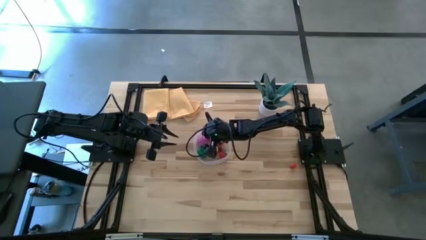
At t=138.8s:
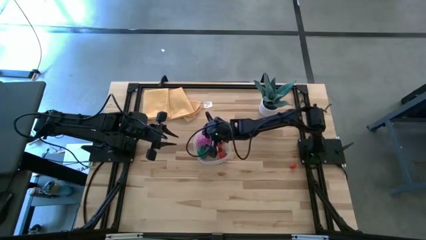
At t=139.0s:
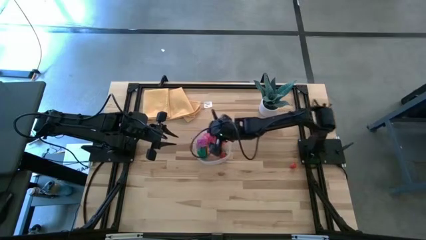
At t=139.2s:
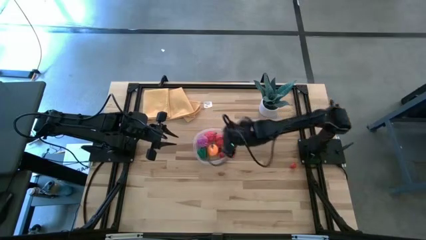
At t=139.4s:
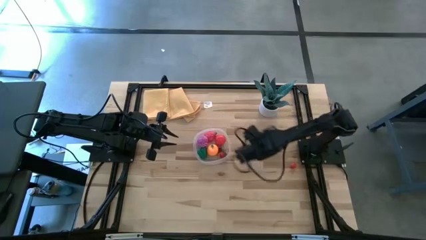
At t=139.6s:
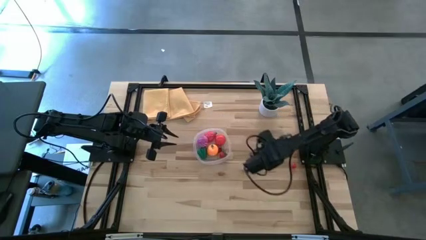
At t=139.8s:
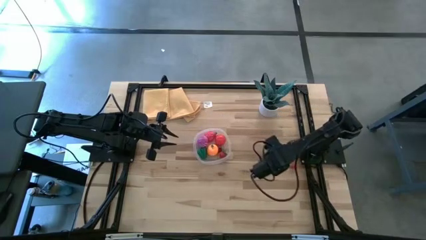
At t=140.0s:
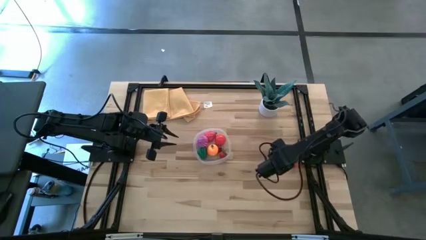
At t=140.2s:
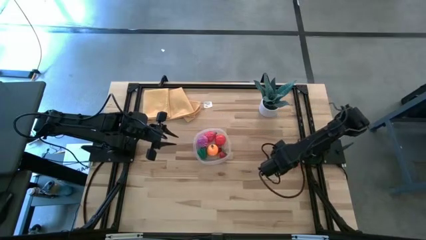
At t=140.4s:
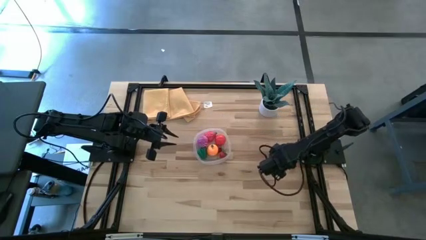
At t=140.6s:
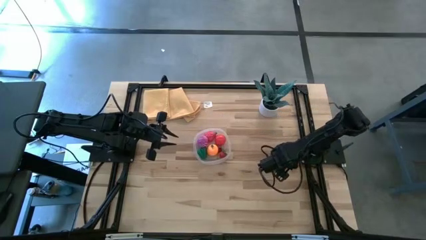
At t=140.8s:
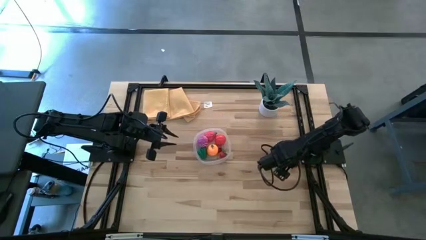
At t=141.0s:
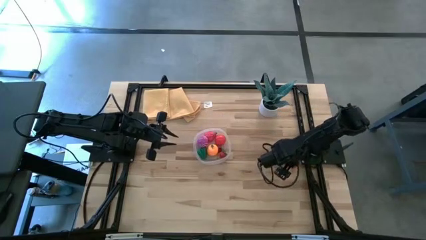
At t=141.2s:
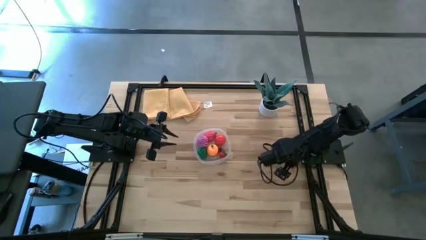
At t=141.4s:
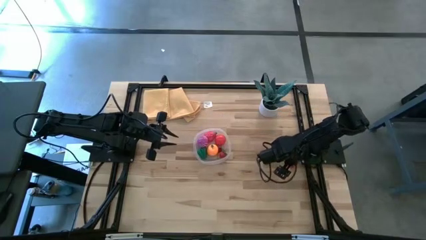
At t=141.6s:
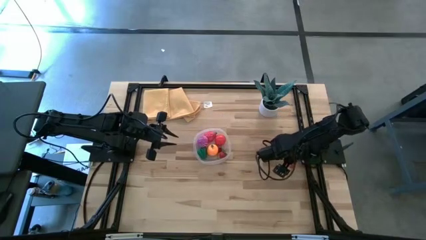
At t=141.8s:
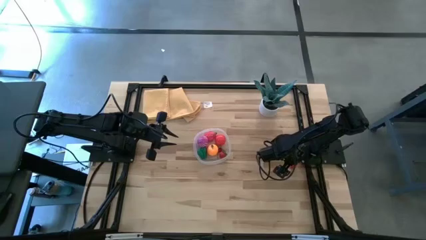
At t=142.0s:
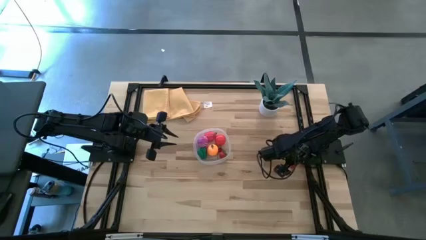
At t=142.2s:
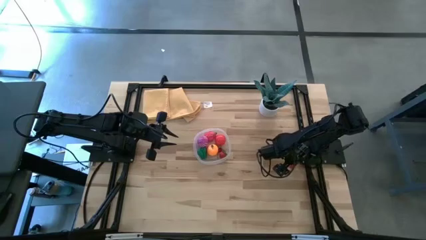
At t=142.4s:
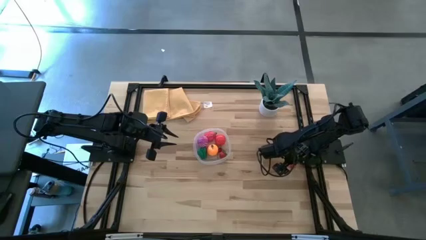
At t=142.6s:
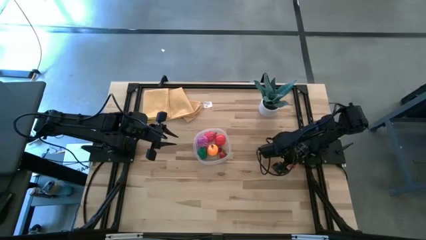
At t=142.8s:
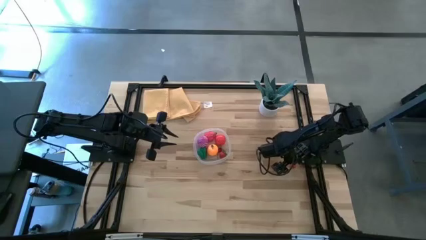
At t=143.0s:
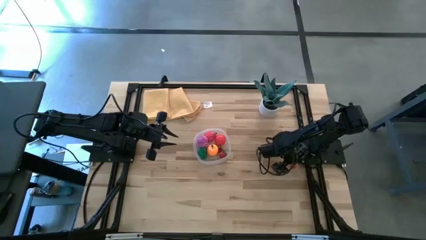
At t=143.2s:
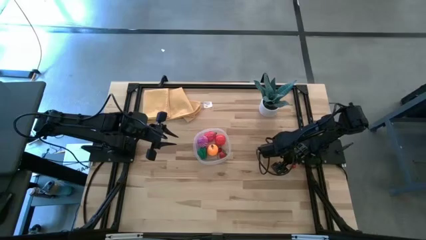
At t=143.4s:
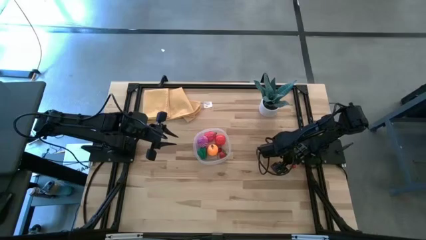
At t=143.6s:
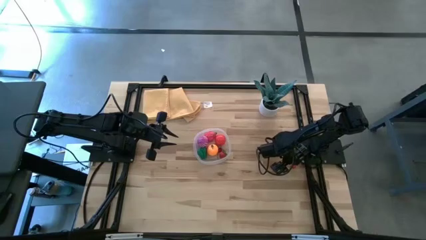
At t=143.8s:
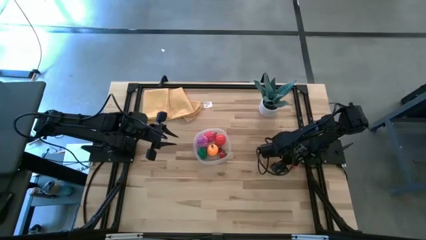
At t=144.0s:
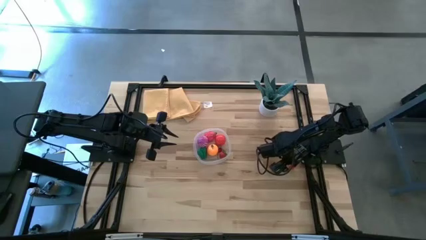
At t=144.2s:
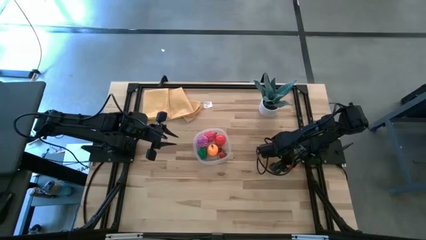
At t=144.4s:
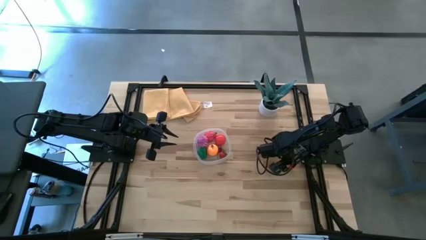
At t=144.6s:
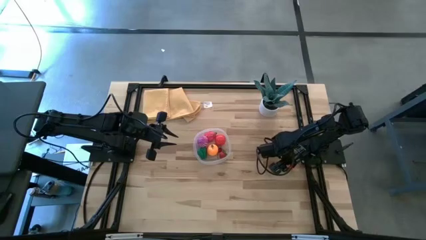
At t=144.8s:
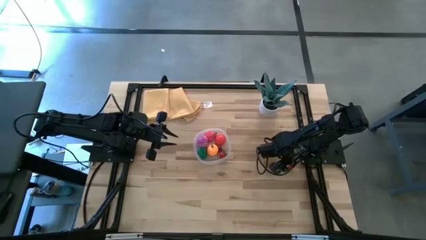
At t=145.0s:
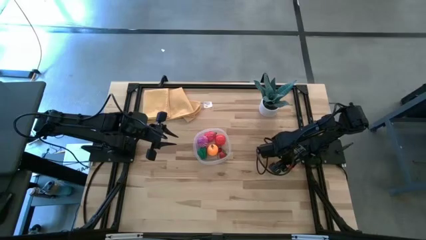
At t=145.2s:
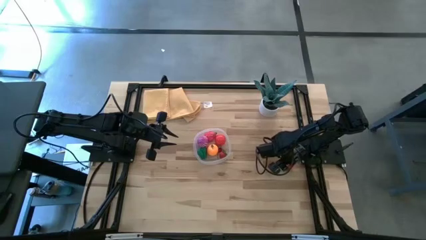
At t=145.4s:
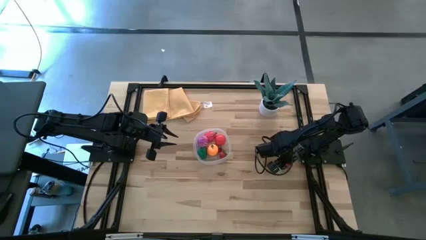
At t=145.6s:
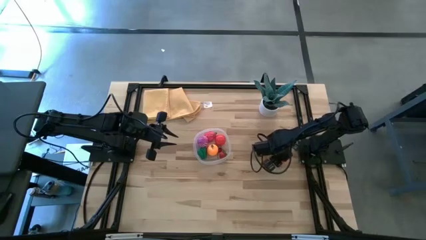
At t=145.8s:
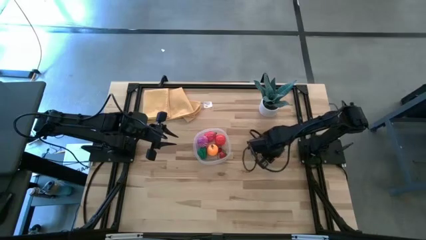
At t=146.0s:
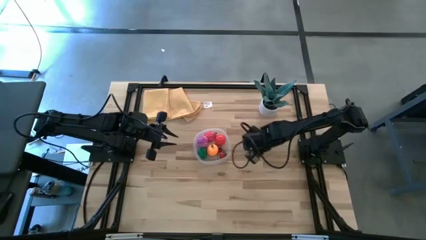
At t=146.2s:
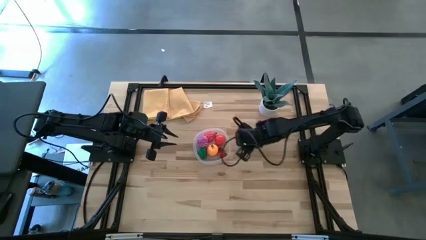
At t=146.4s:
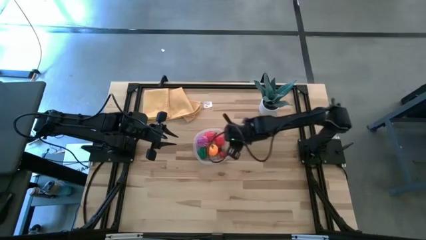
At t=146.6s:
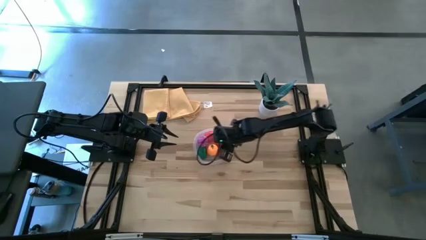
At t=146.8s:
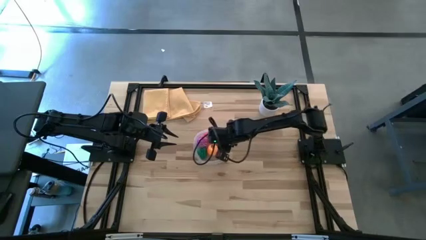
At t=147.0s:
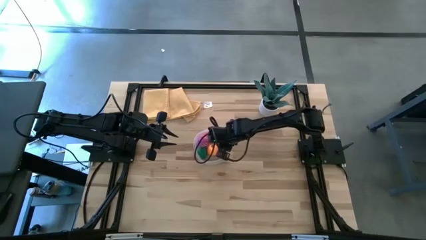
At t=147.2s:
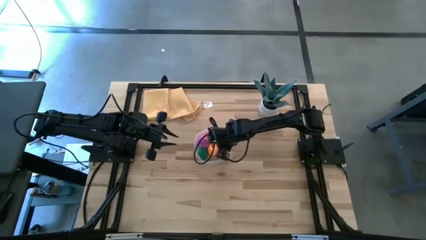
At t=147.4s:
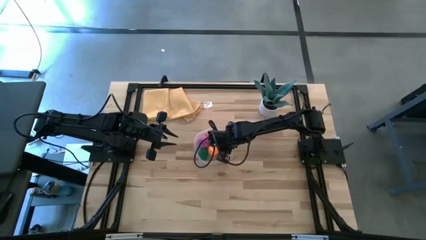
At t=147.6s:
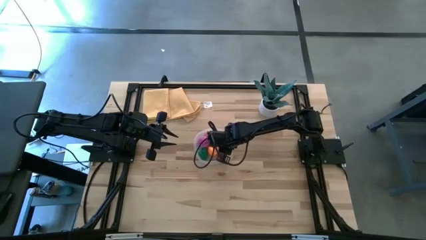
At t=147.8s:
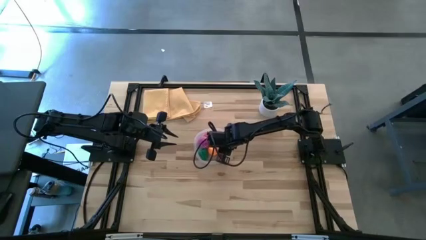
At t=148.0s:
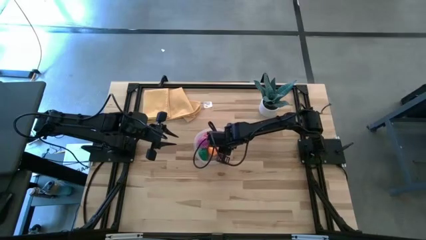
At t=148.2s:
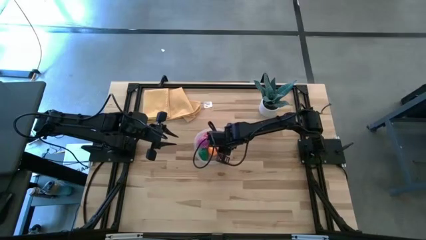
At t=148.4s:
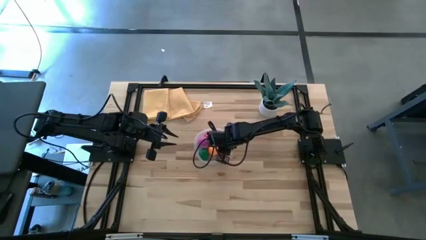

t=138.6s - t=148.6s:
Task: Pick and placing Produce into tupperware
Put the red cherry into the transparent bin

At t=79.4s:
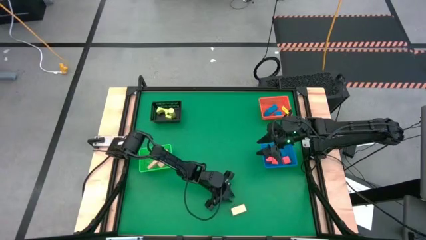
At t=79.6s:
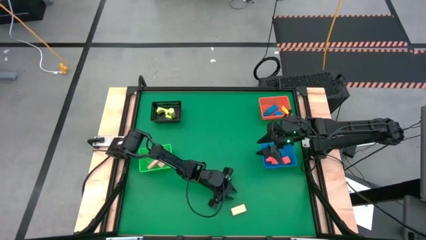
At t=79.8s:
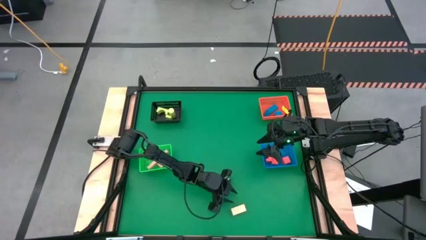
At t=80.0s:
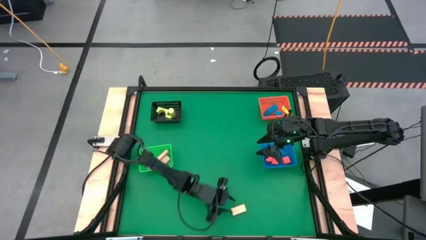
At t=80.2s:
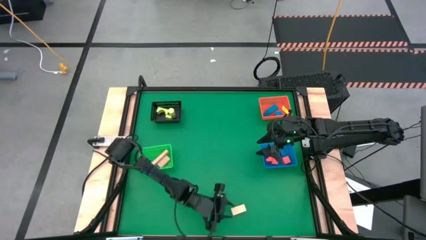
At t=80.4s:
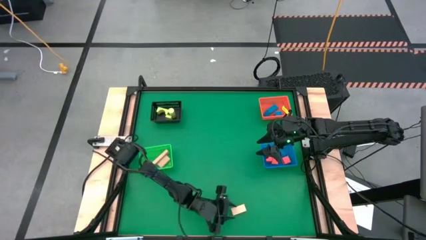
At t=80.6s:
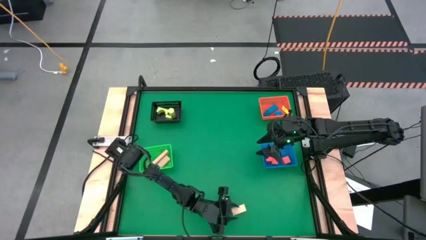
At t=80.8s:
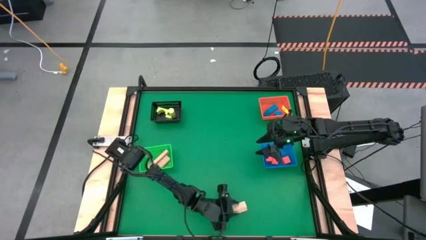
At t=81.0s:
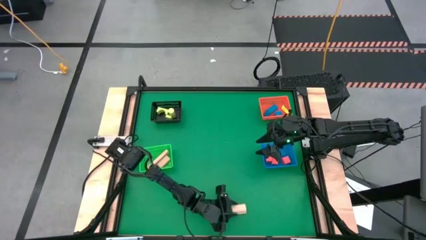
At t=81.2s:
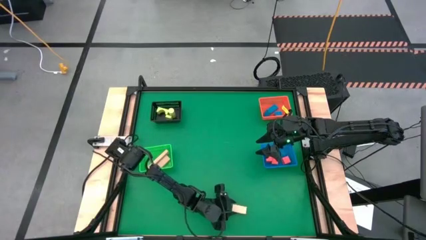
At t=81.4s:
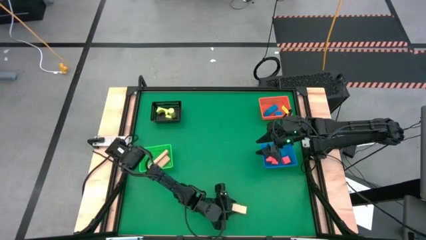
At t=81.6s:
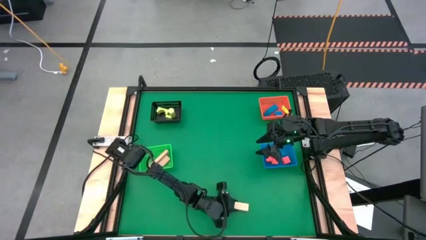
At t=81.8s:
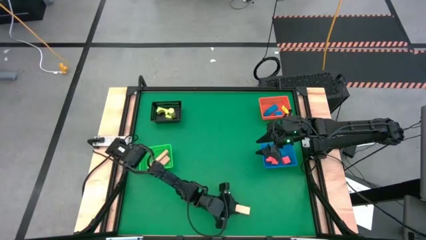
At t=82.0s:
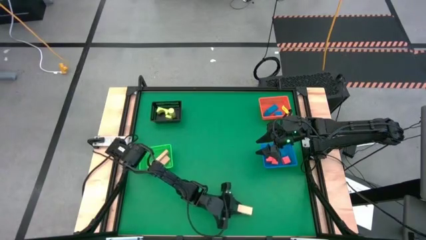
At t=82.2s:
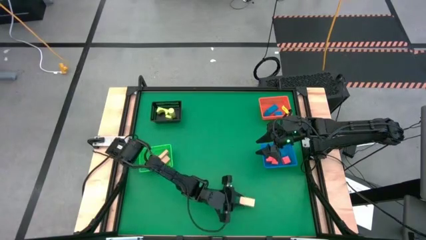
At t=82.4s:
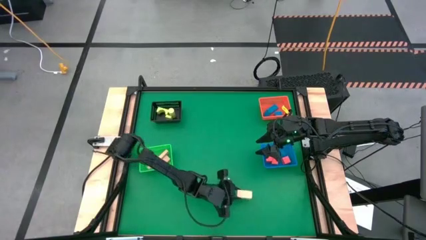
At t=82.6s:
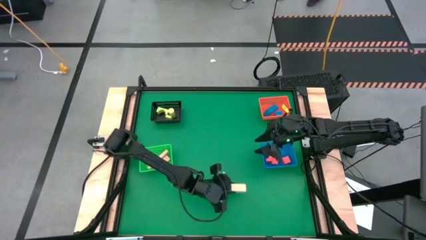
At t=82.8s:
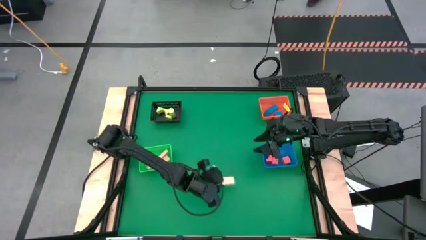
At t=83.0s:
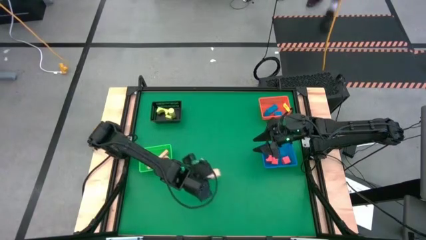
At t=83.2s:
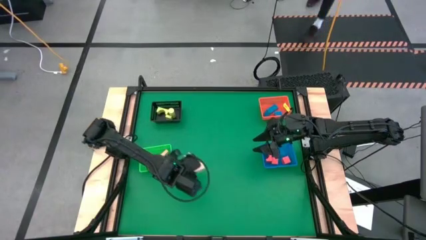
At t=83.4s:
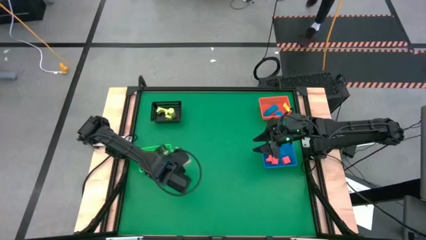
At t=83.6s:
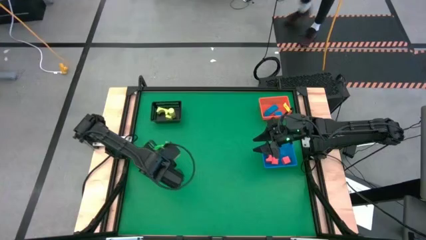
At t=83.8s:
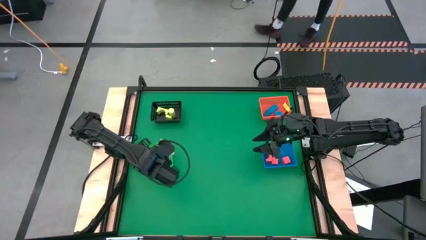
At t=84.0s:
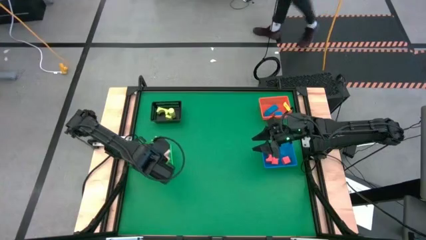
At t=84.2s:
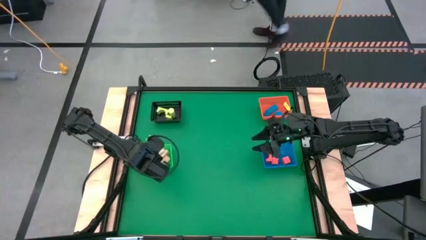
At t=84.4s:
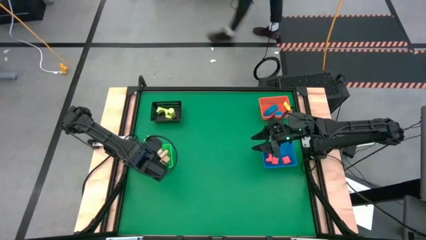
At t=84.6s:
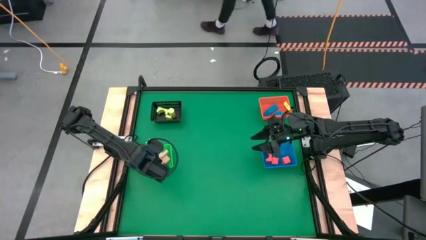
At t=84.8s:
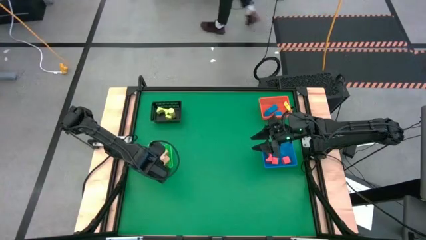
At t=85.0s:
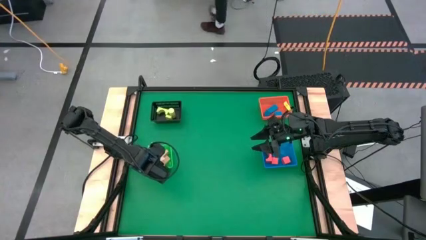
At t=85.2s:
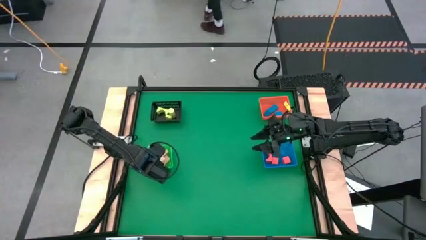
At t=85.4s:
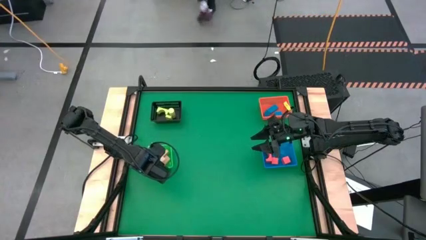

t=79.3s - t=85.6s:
Task: Sort & place blocks by color
Put the light brown block into the green bin
